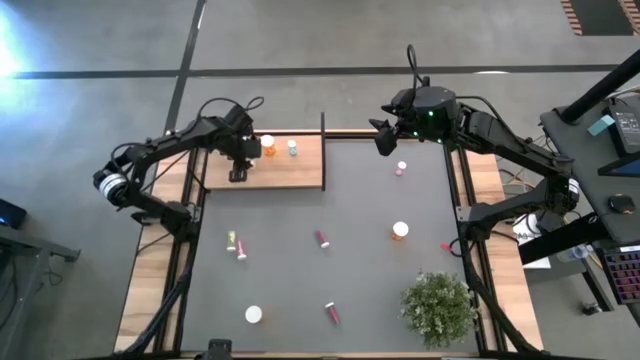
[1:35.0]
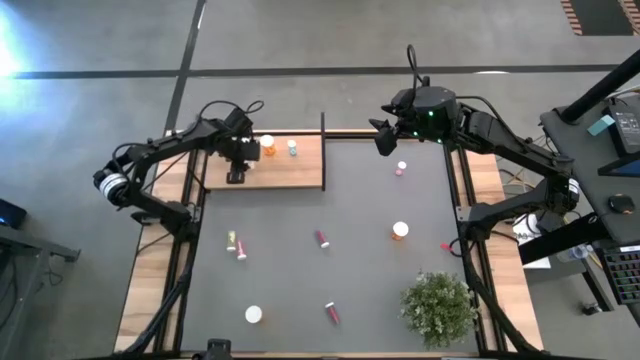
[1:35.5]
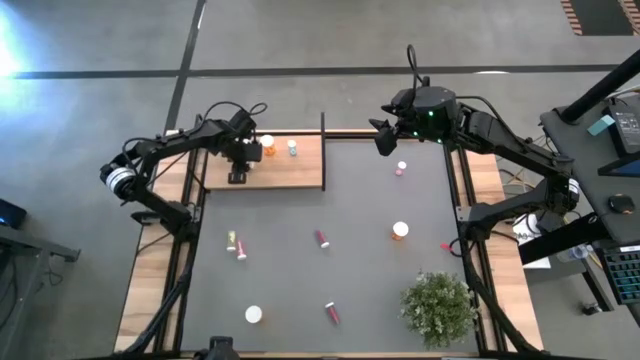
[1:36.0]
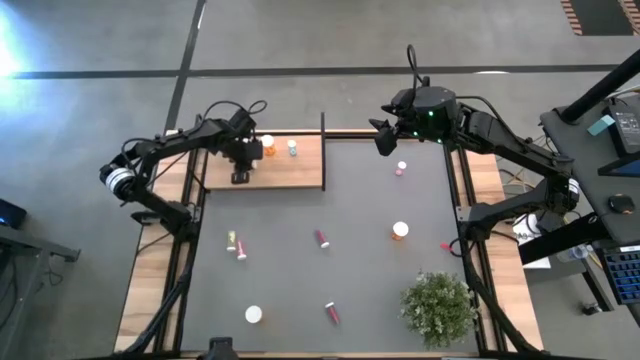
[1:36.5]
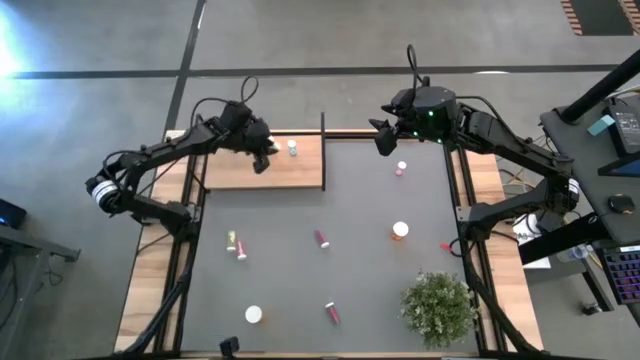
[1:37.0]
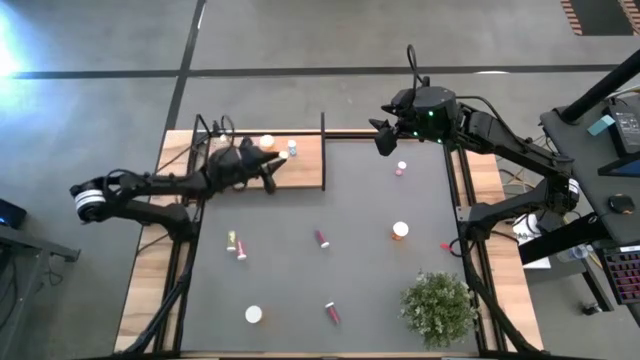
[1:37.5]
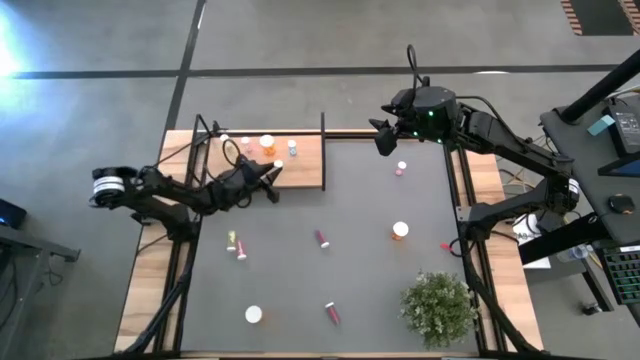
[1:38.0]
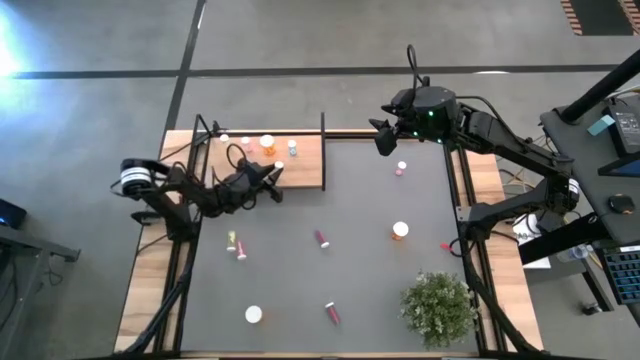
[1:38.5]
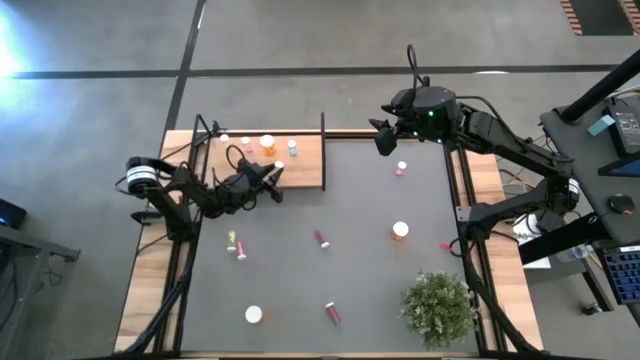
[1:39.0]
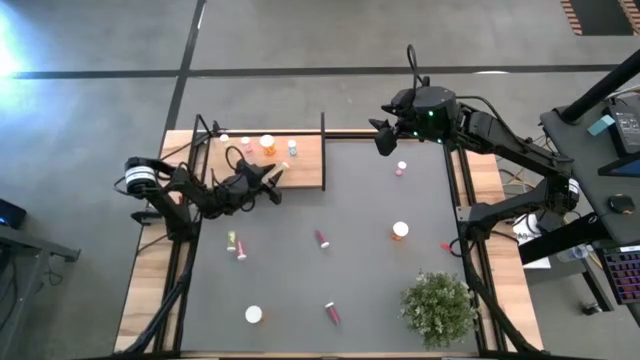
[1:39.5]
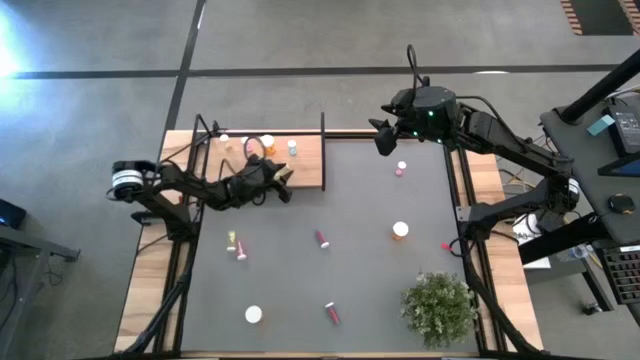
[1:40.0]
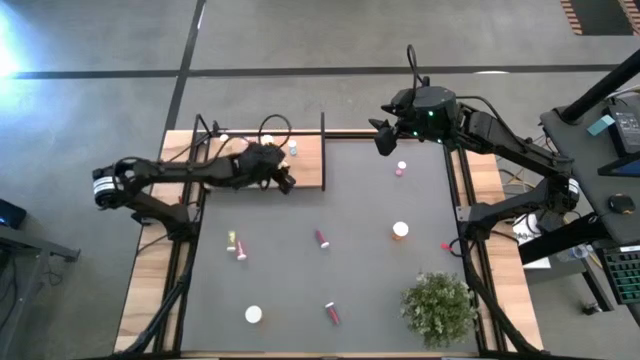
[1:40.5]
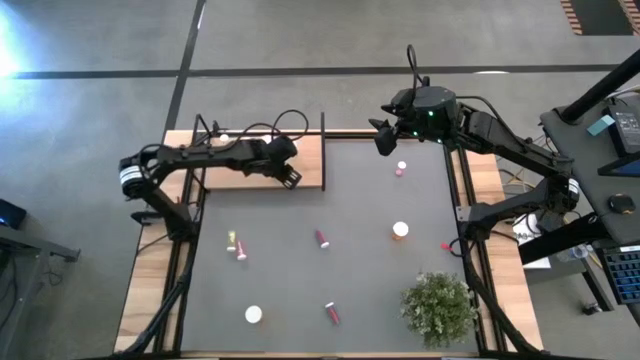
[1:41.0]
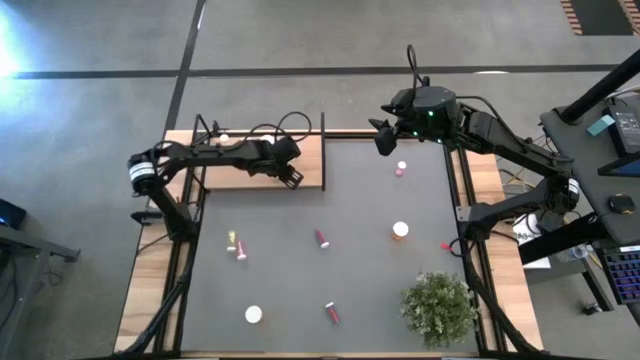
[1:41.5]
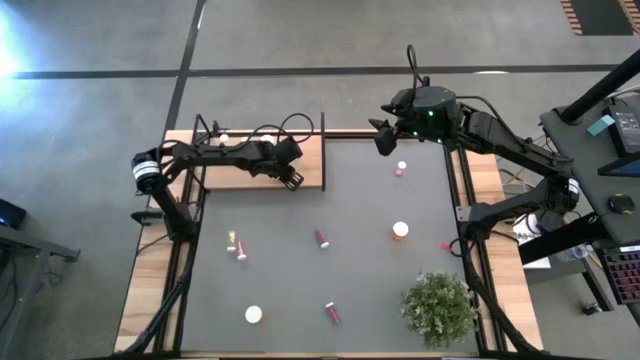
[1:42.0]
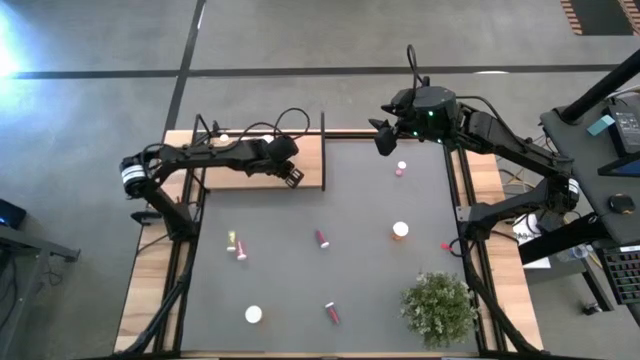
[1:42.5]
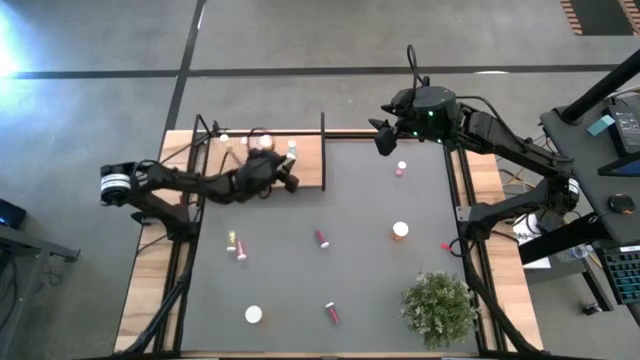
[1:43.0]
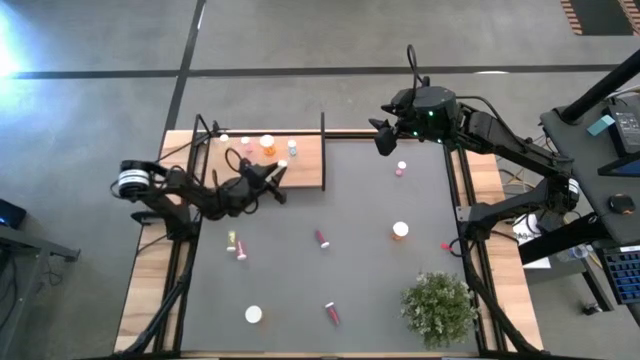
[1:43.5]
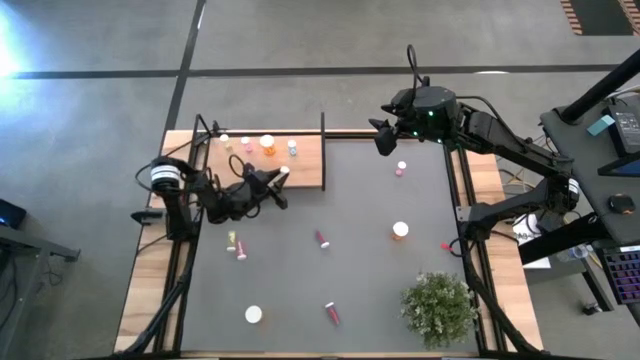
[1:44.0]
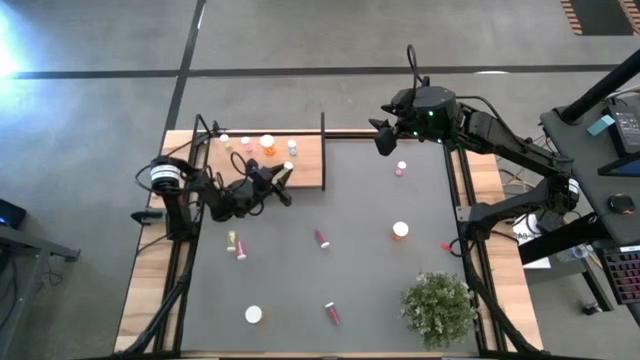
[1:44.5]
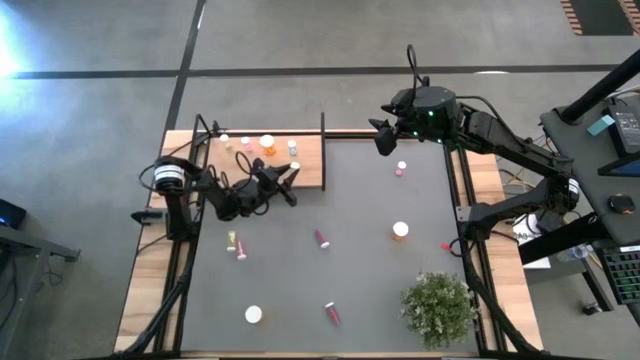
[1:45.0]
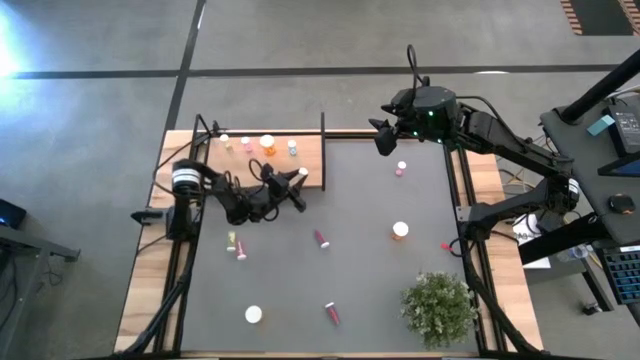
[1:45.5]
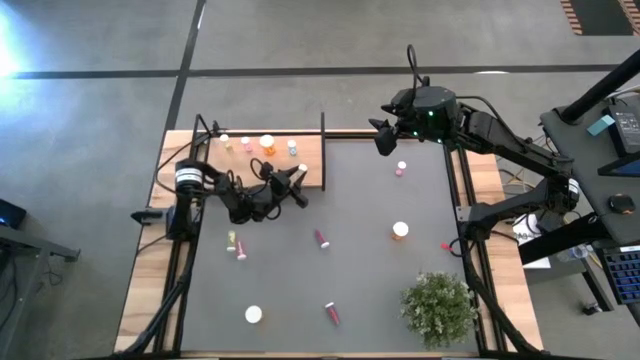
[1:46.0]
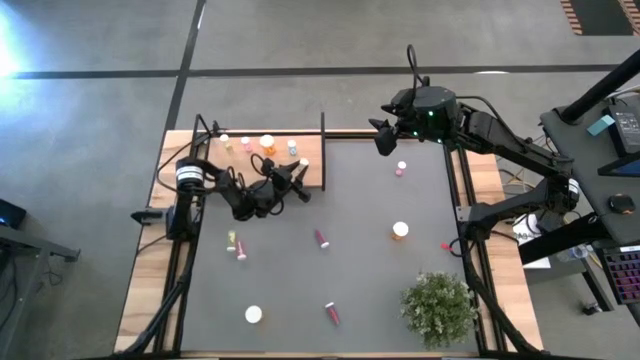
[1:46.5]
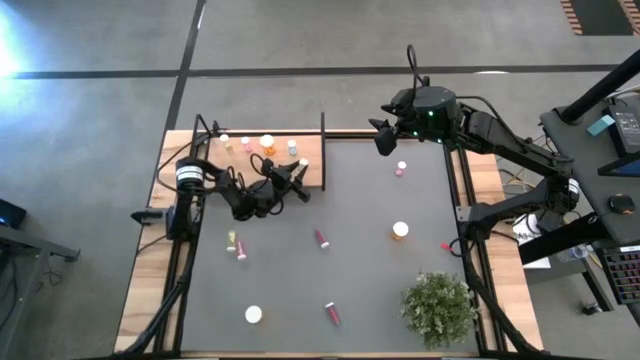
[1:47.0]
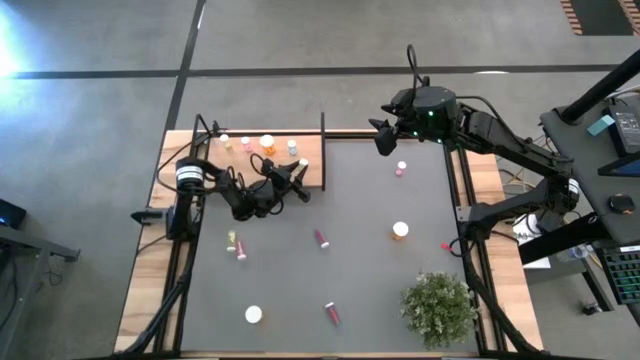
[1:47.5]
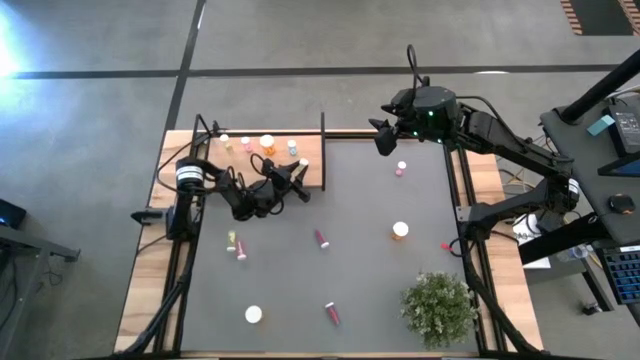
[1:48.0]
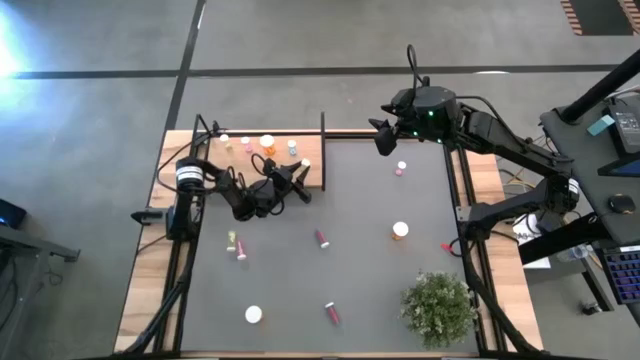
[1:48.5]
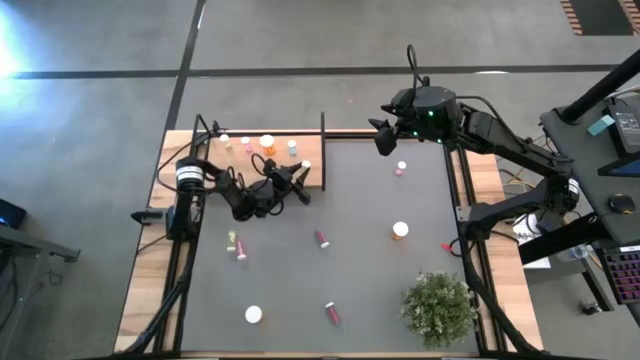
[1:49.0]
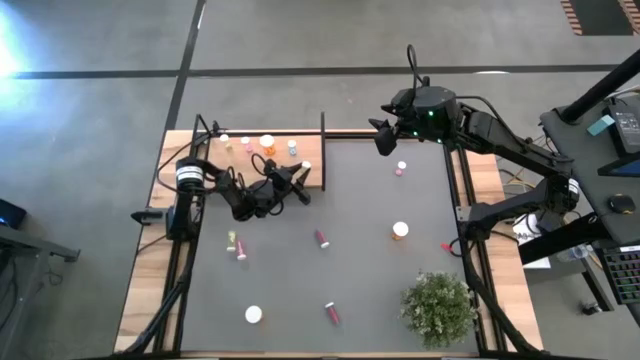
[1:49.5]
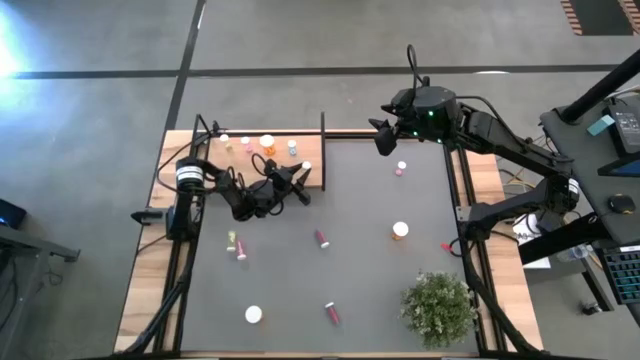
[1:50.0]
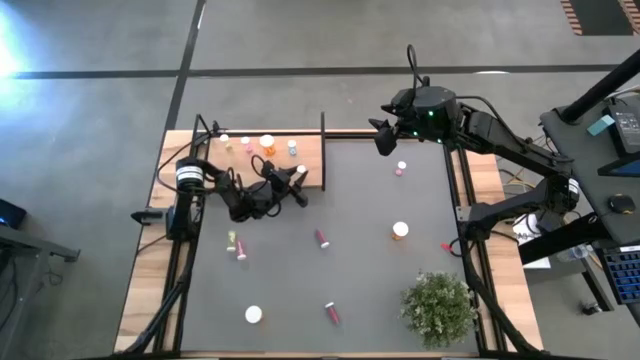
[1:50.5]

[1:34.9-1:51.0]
Task: Pick and place medicine bottles onto shelf by color
Put the right yellow pill bottle on the shelf aligned with the other yellow pill bottle

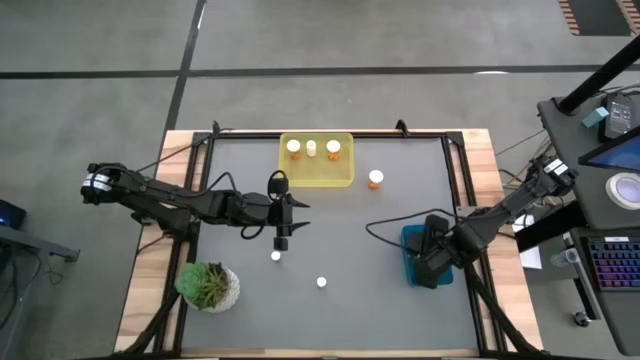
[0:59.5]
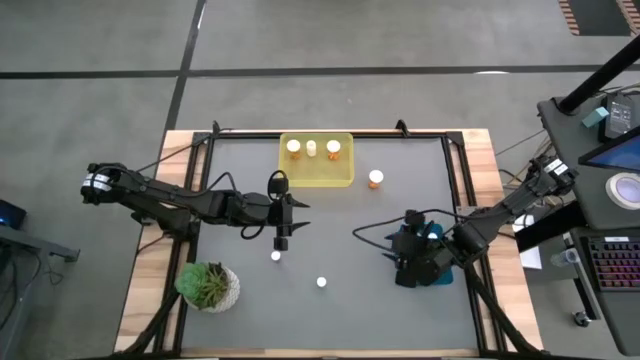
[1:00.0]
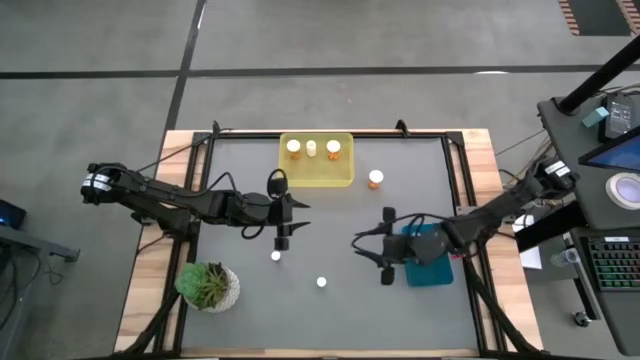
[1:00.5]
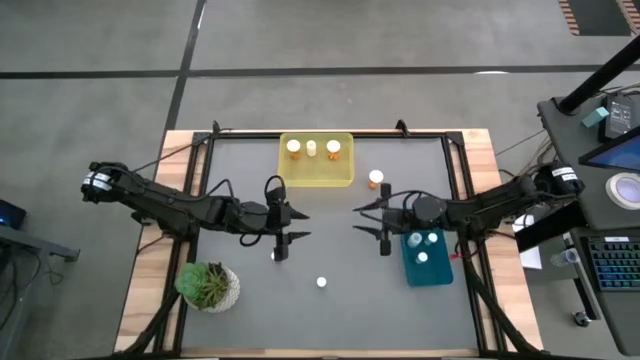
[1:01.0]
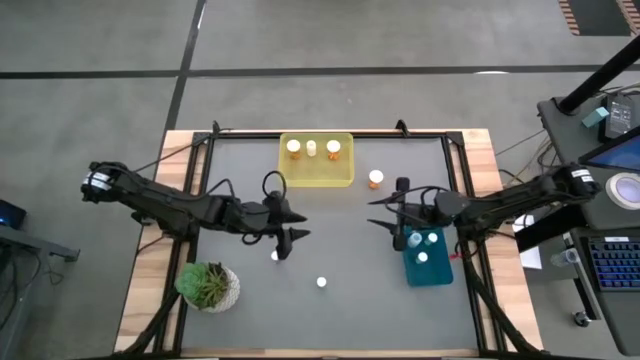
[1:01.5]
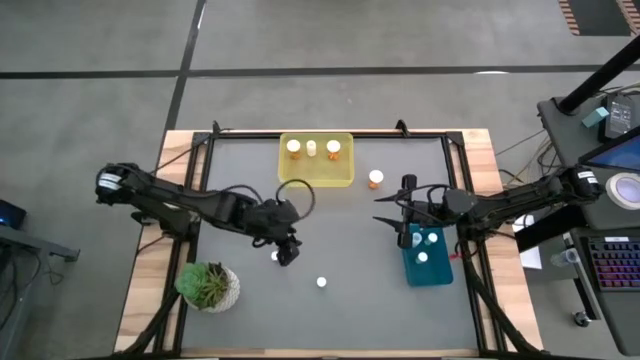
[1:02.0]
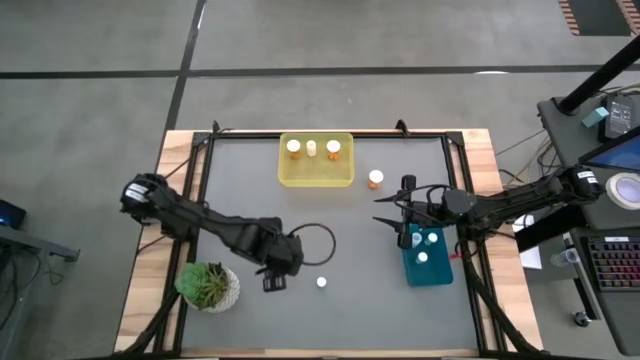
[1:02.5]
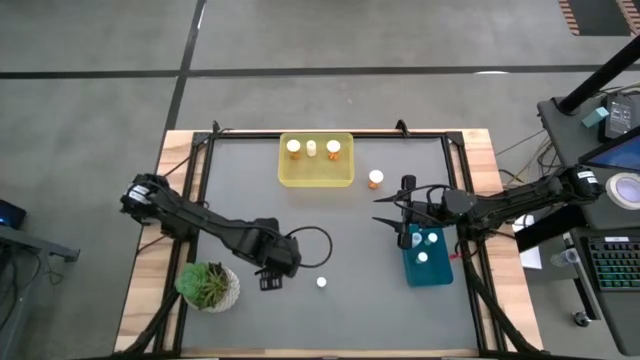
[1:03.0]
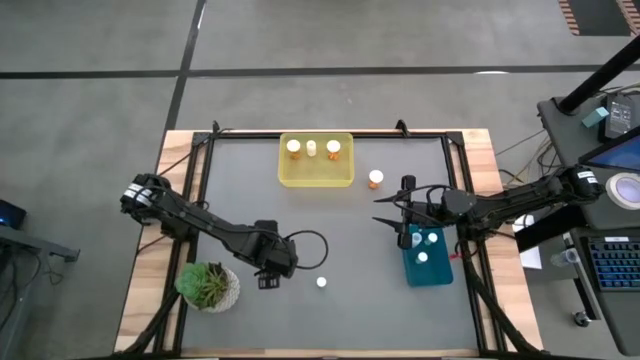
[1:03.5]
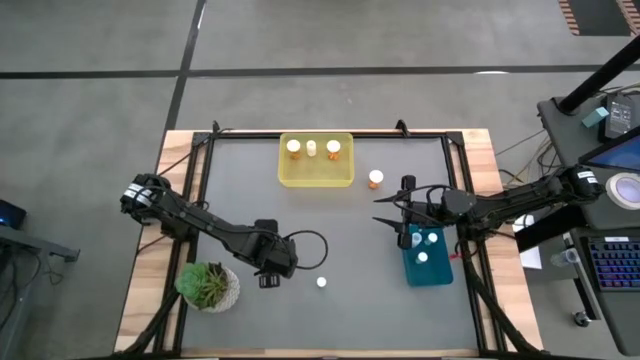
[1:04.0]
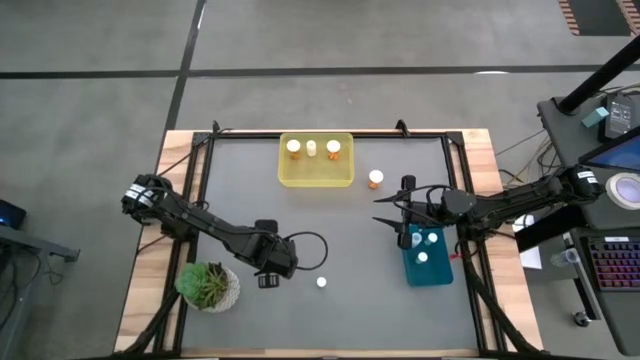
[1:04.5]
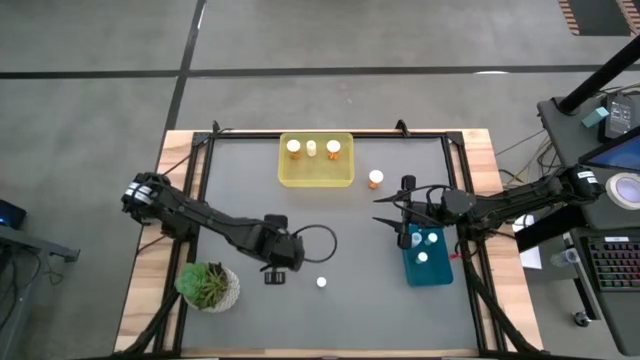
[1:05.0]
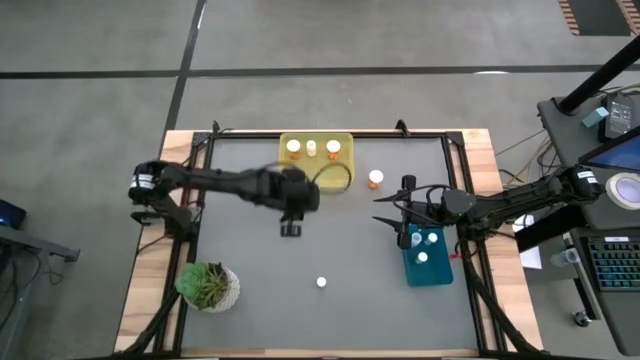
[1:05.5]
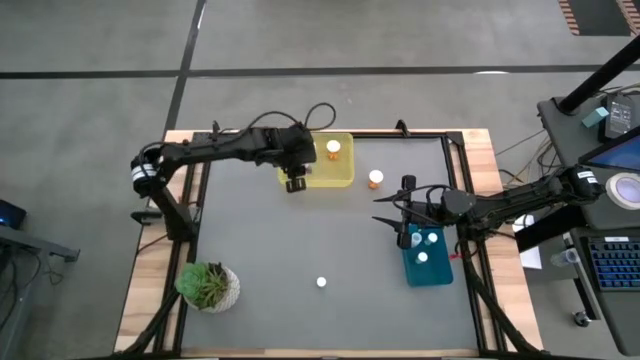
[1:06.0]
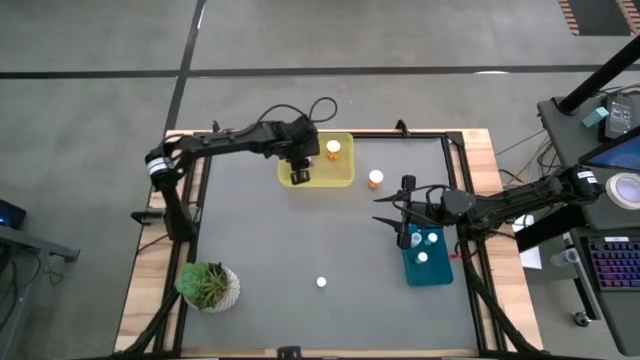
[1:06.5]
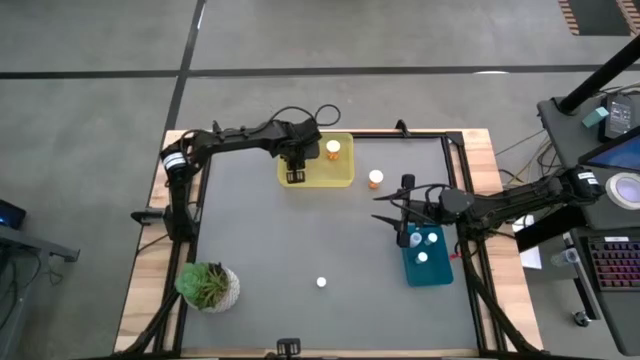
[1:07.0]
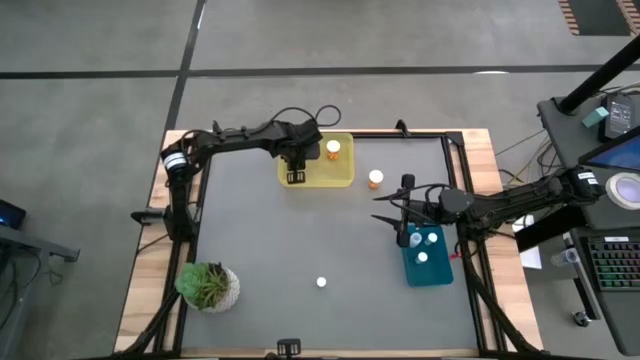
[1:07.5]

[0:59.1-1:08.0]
Task: Pick and place medicine bottles into bin by pill shape (circle, oval)
Put the blue pill bottle into the yellow bin
